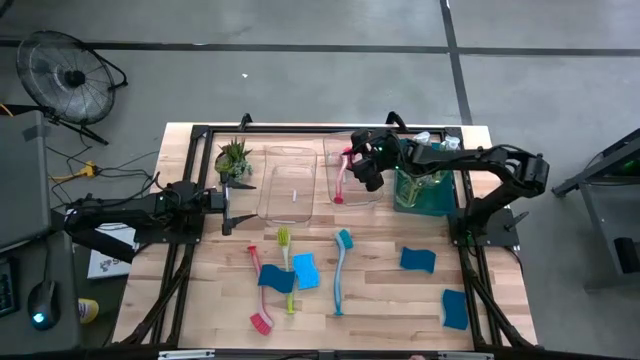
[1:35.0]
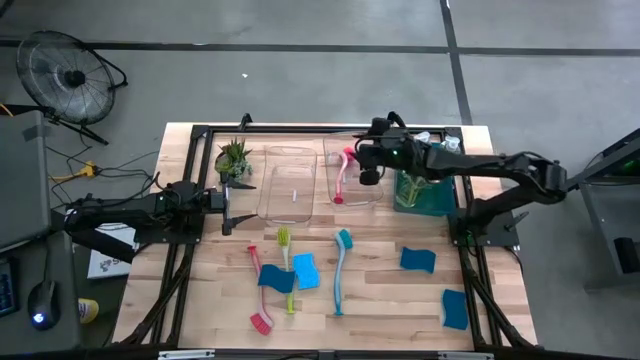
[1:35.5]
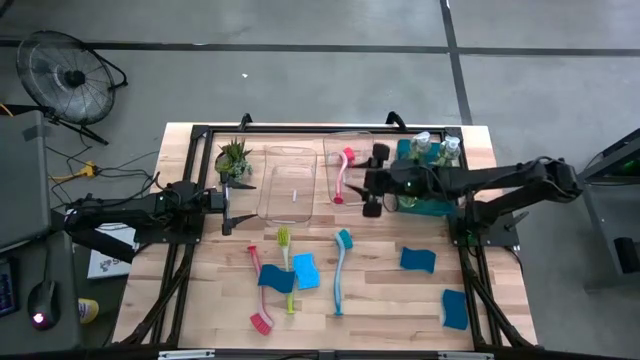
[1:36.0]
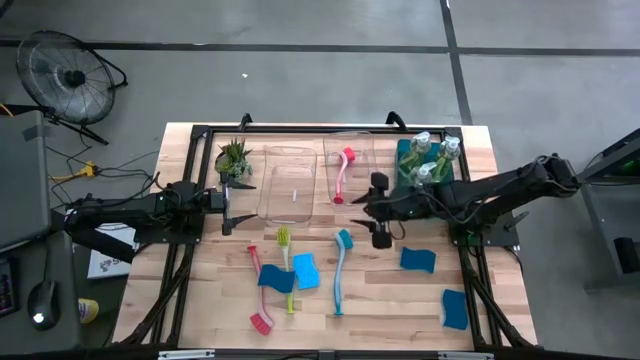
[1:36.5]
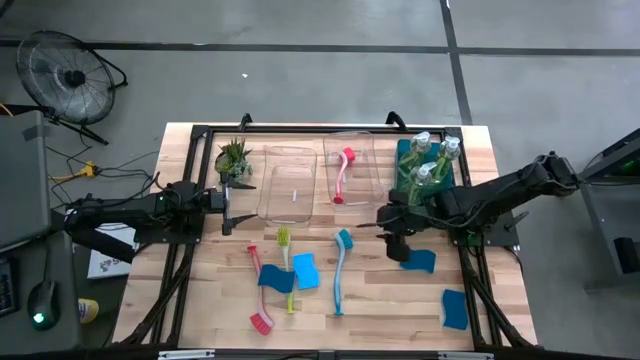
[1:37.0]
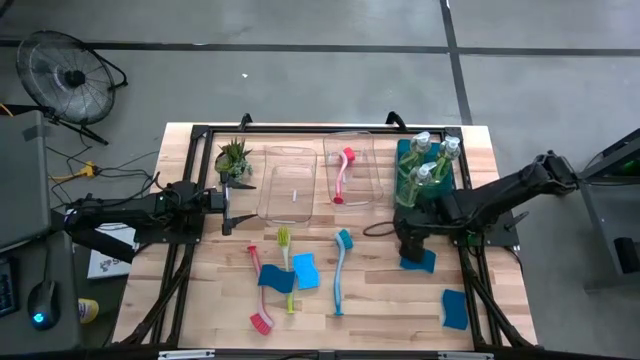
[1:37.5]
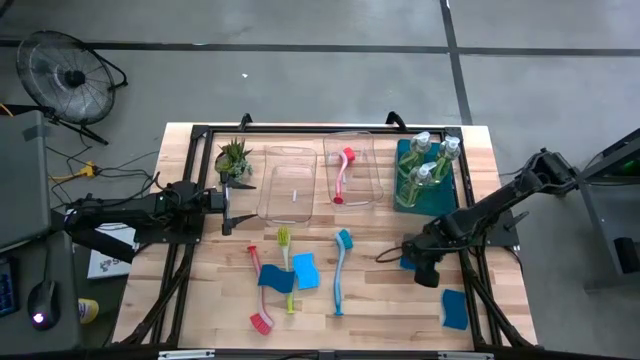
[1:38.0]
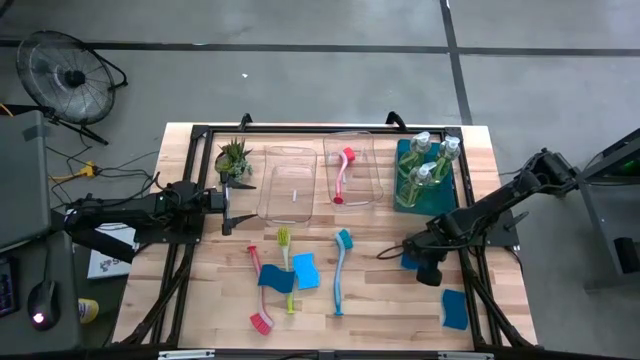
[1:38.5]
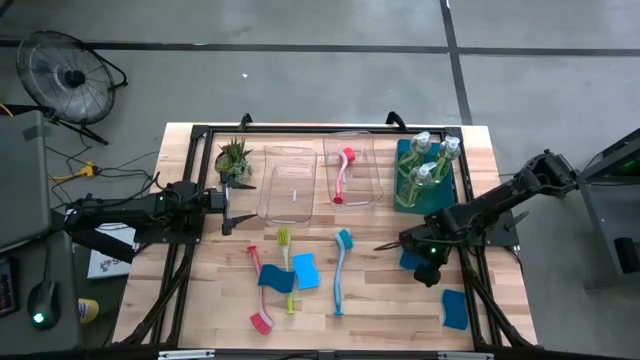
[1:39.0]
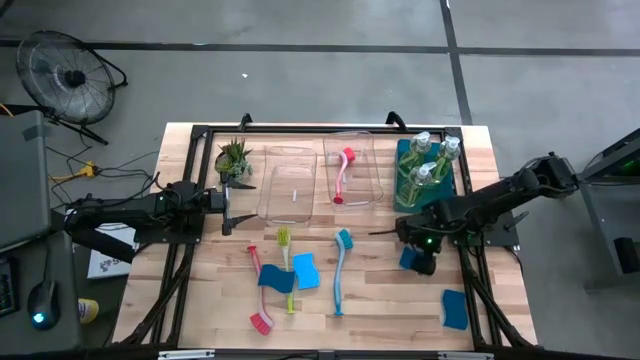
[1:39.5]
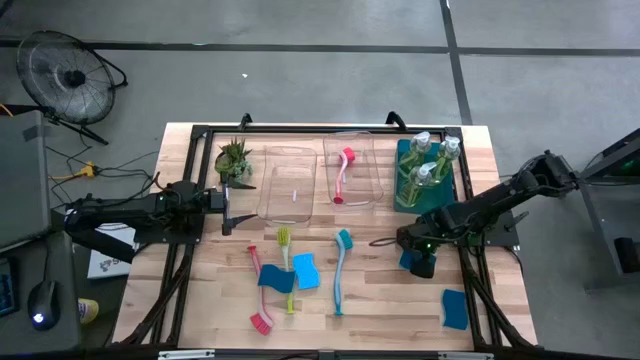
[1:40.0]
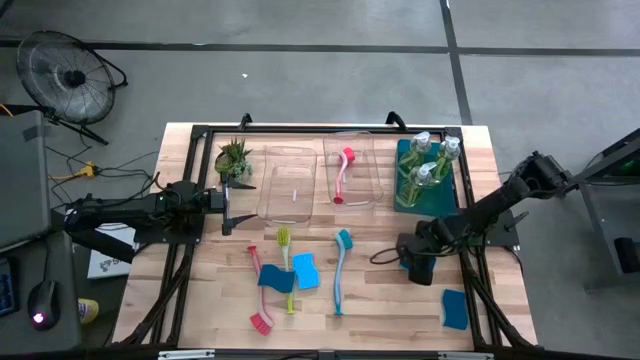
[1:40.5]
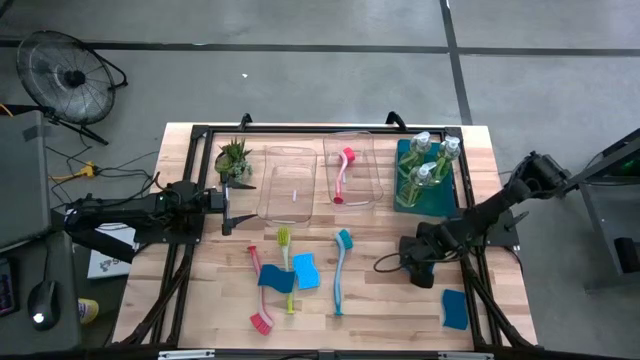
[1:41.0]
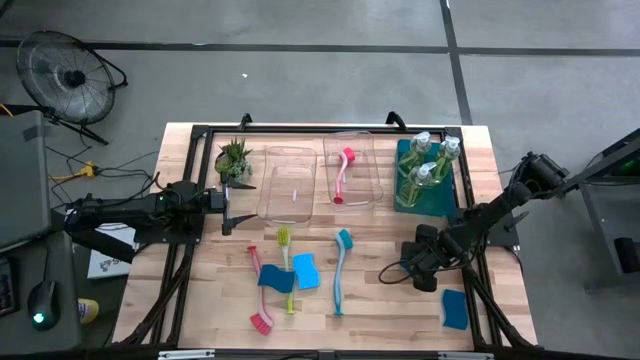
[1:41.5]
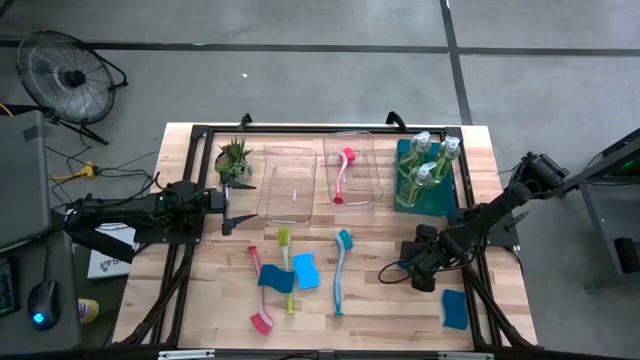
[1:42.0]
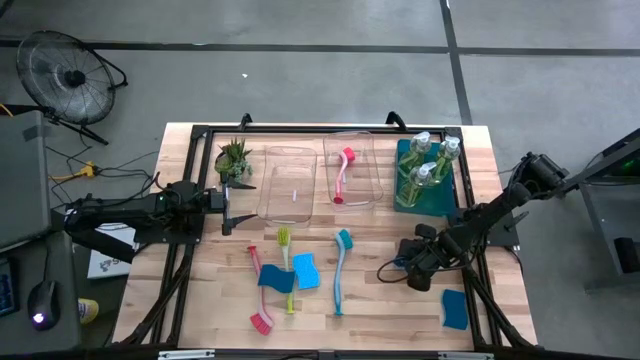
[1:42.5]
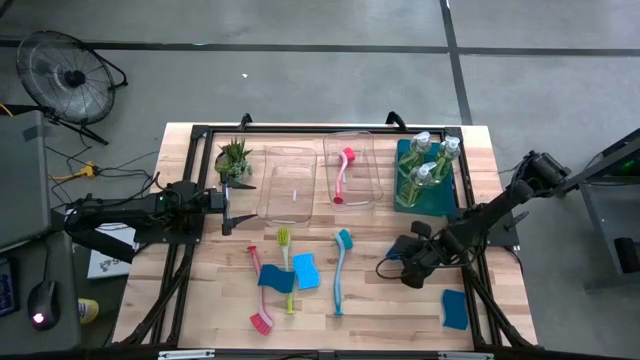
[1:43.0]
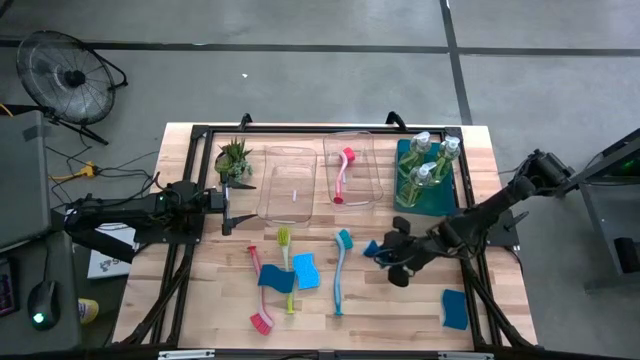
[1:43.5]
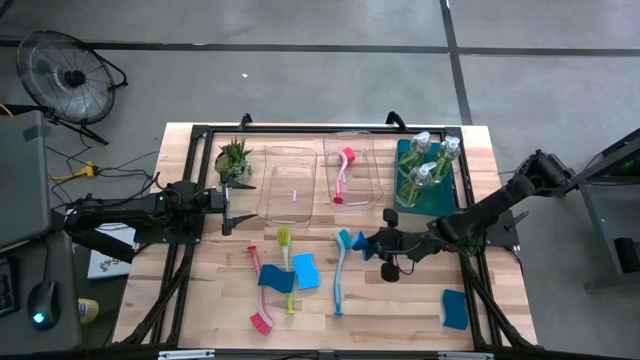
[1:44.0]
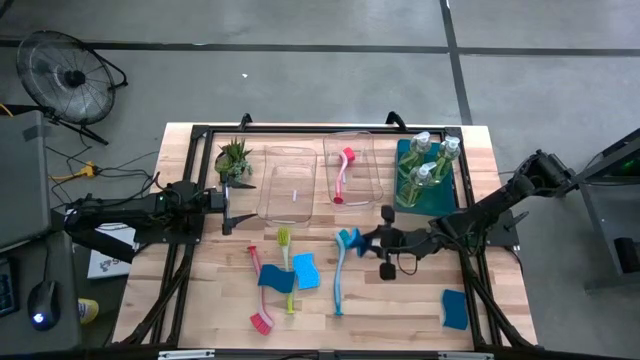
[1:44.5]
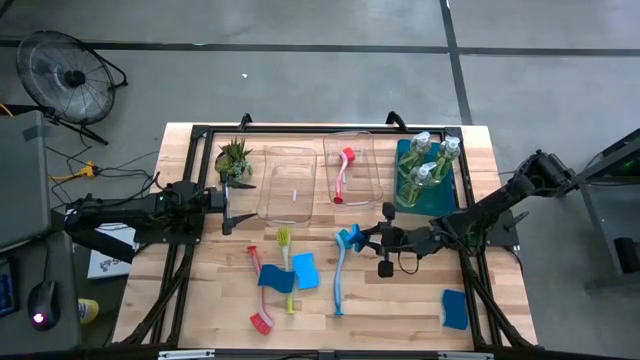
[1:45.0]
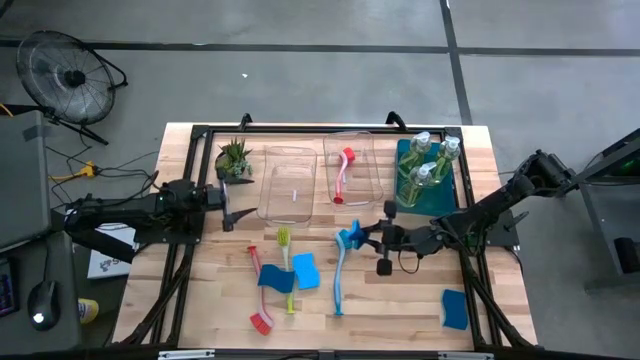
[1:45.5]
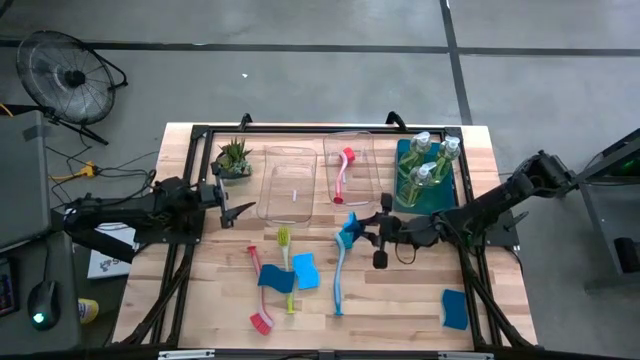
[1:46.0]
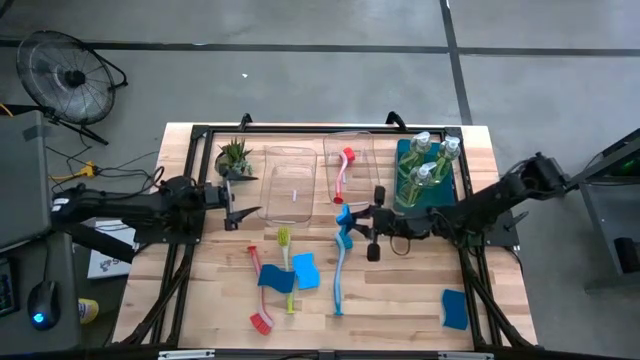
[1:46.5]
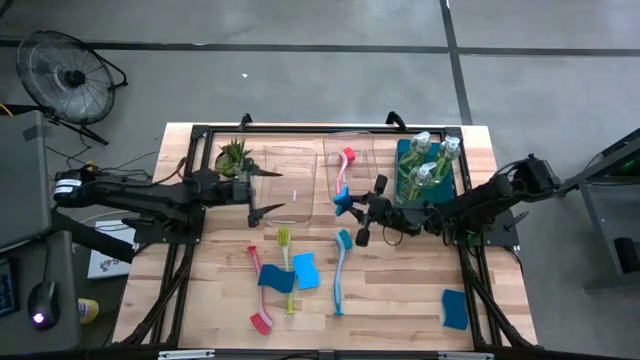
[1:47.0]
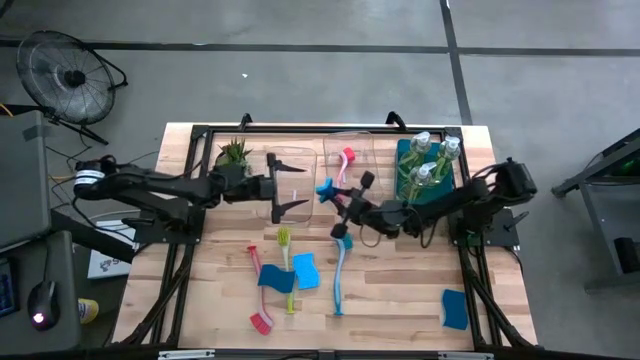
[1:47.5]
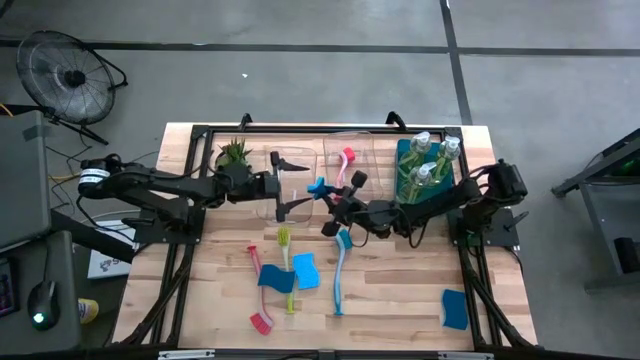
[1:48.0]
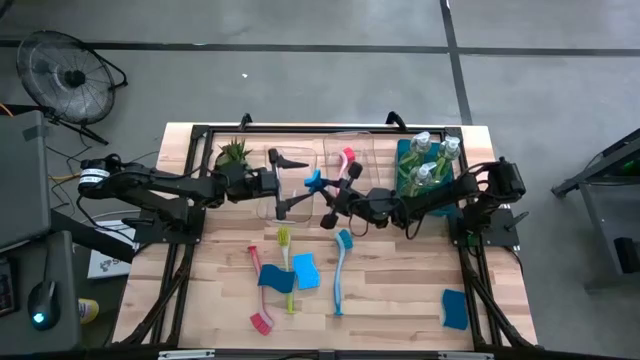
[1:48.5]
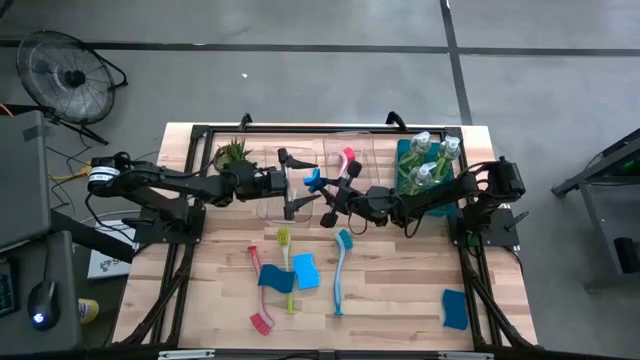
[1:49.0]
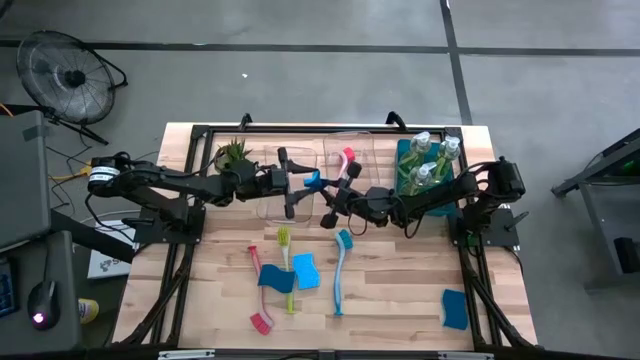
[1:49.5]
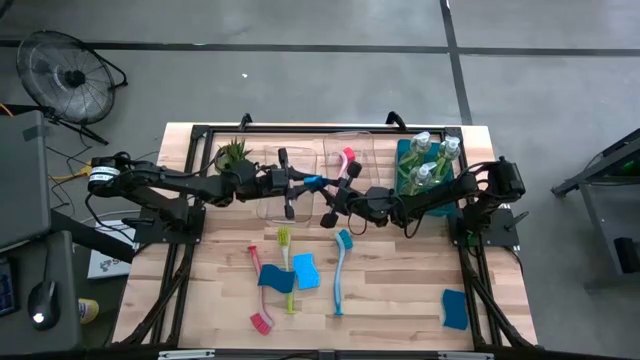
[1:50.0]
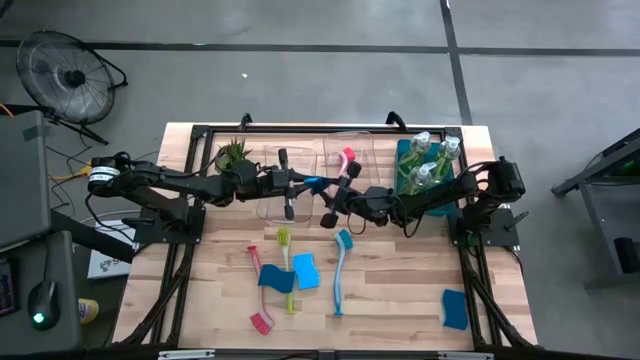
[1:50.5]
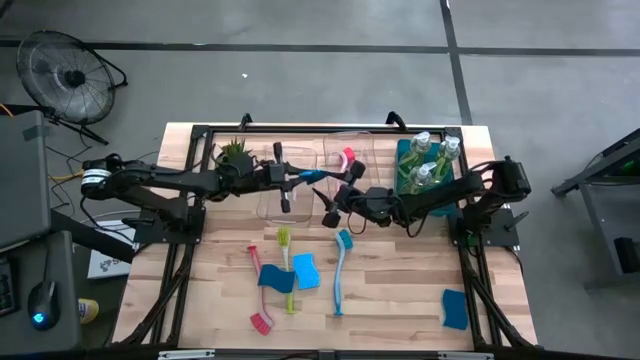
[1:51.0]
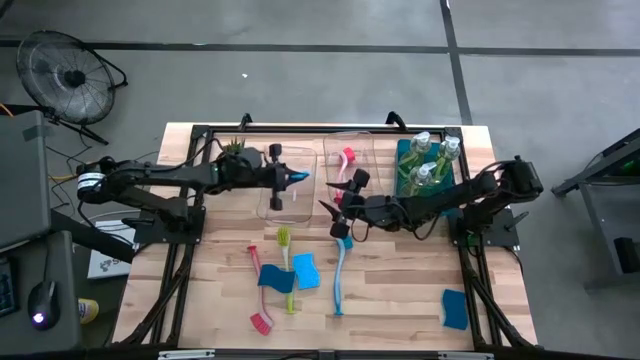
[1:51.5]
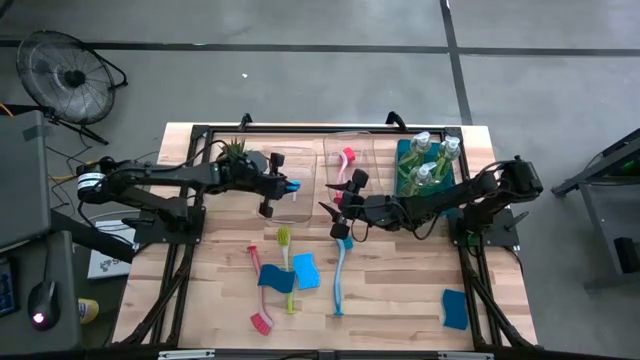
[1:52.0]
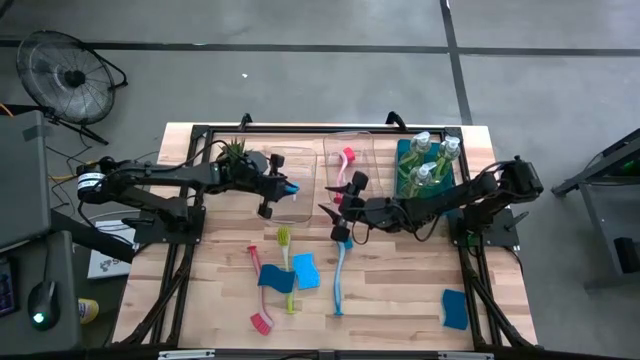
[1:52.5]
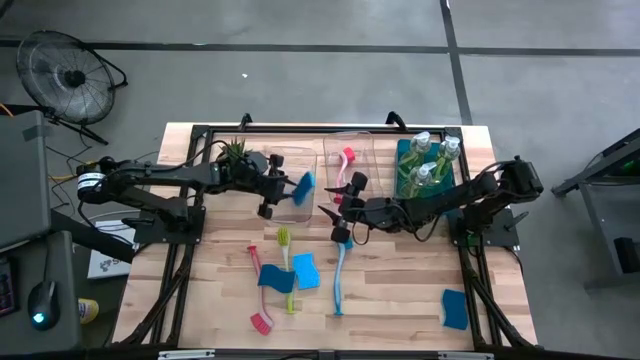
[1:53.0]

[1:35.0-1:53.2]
Task: Pick & Place Kitchen Sink Supplies
Put the top right blue dishwashing sponge into the left transparent bin

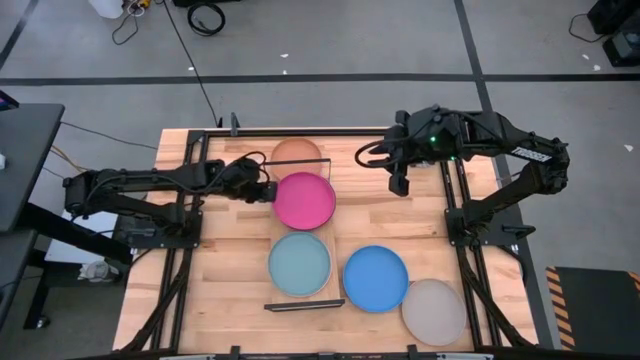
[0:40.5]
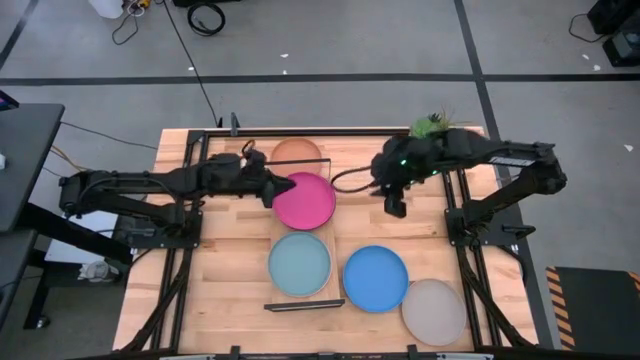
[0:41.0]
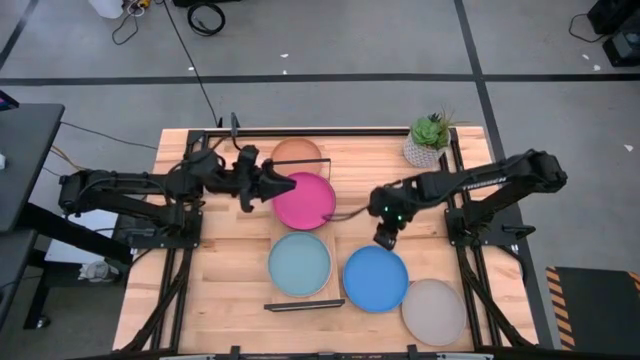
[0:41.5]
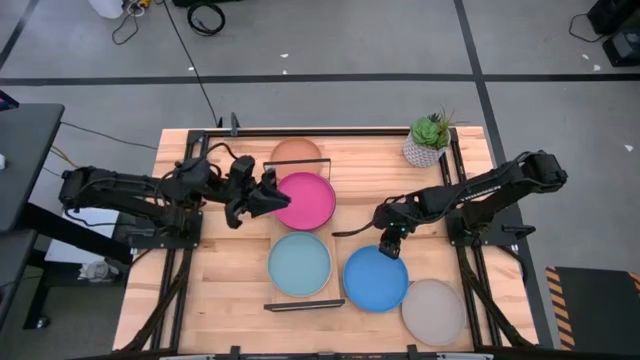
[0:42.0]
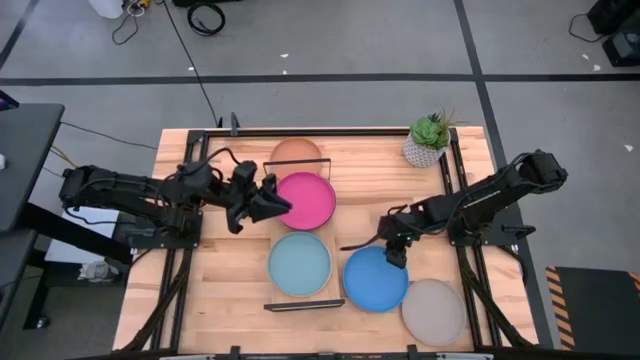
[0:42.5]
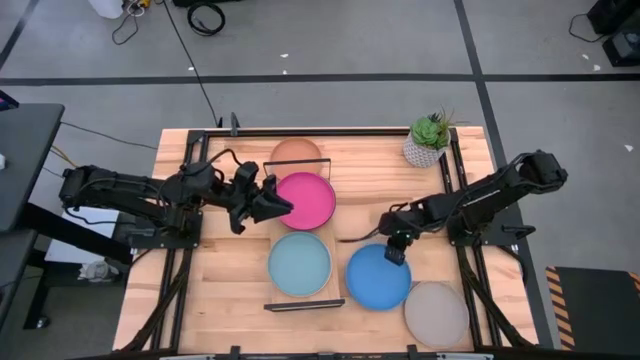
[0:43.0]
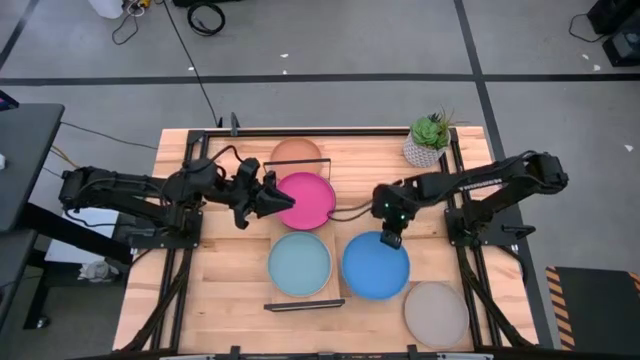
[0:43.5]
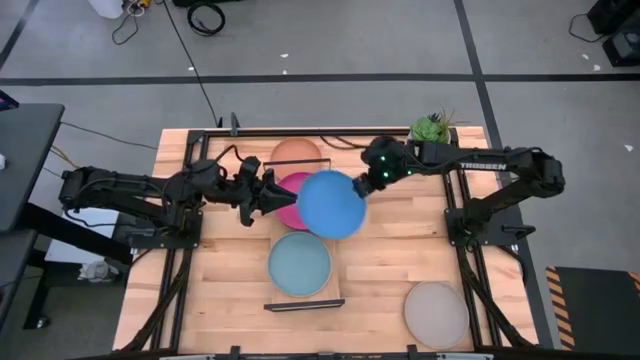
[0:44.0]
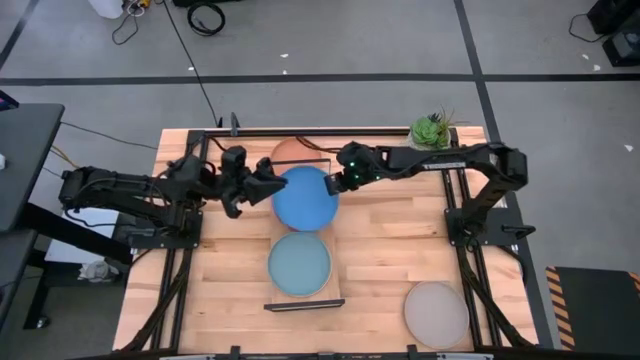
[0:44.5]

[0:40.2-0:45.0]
Task: Place and stack plates onto a shelf
Stack the blue plate on top of the pink plate on the shelf
